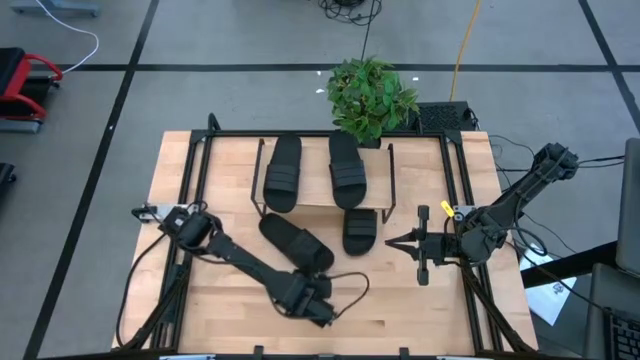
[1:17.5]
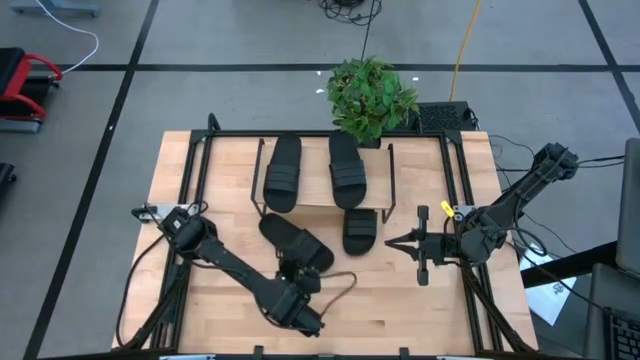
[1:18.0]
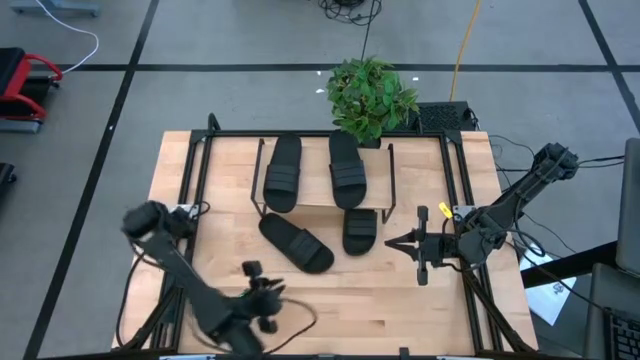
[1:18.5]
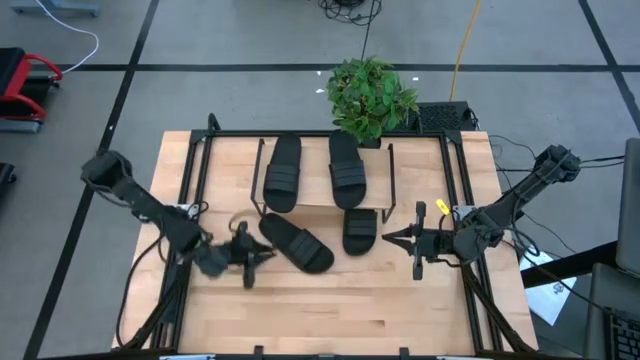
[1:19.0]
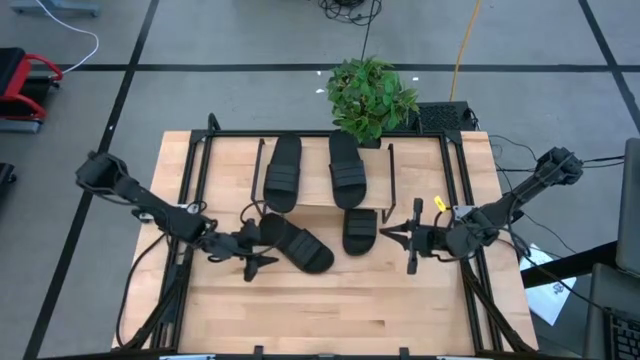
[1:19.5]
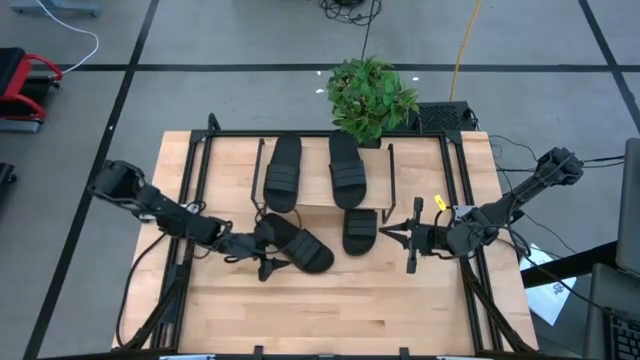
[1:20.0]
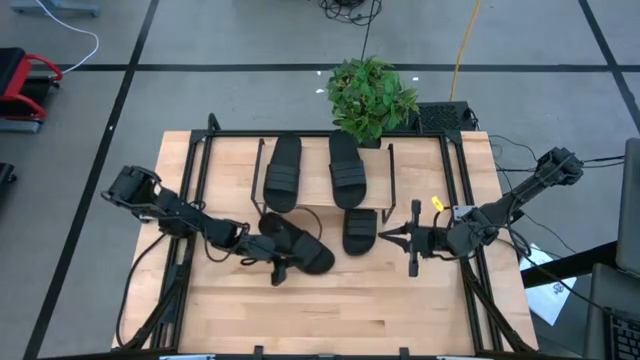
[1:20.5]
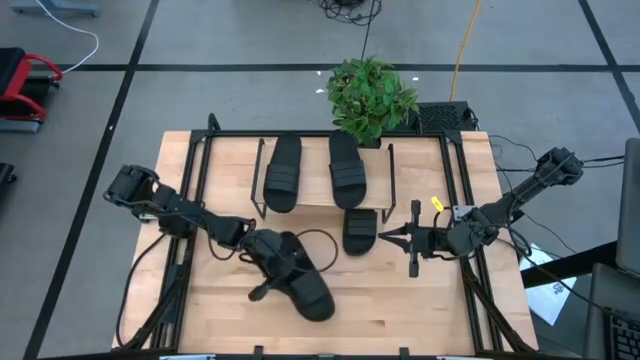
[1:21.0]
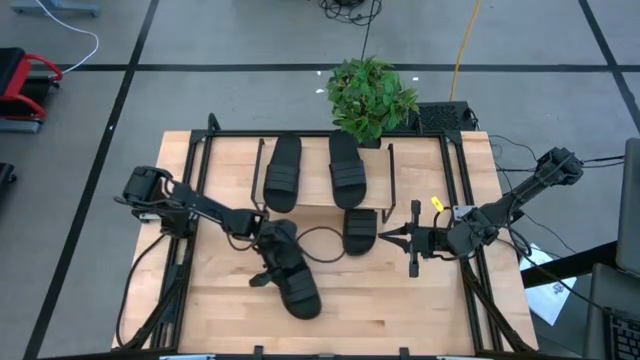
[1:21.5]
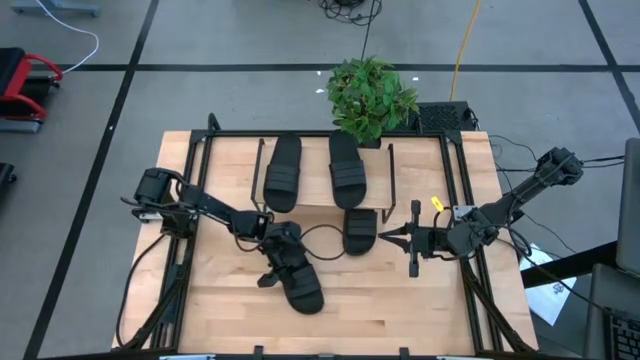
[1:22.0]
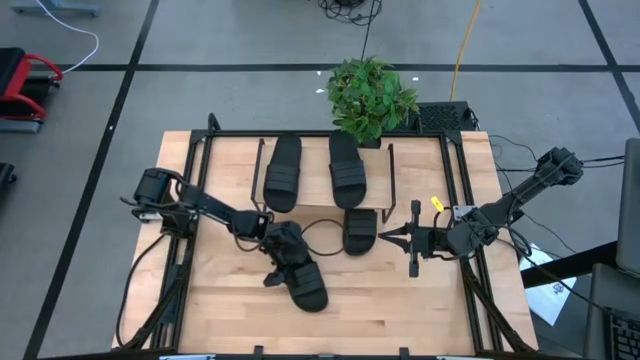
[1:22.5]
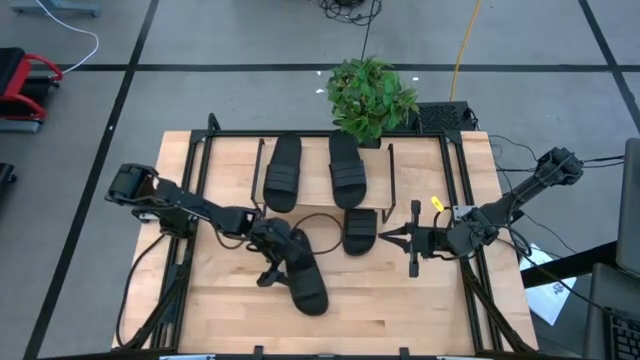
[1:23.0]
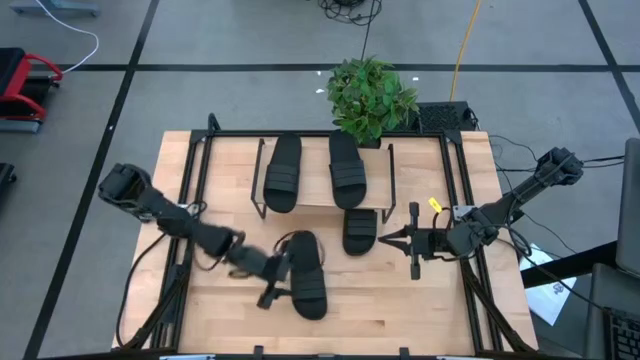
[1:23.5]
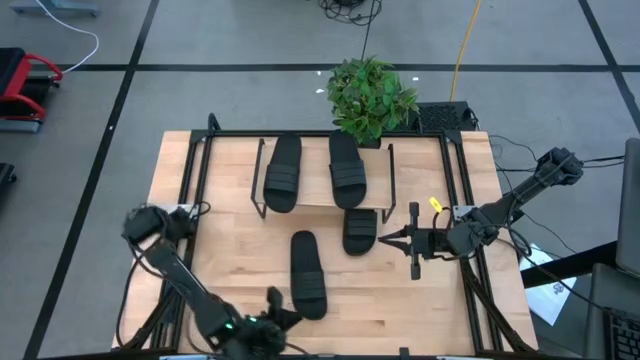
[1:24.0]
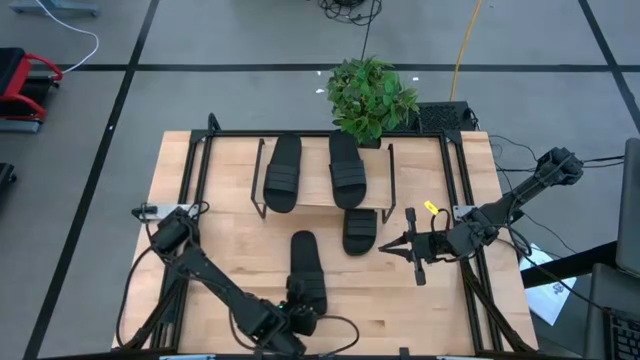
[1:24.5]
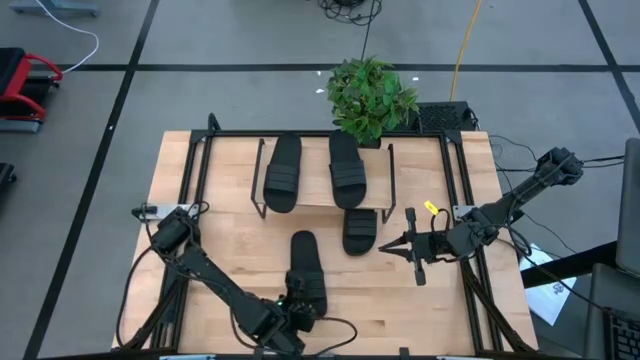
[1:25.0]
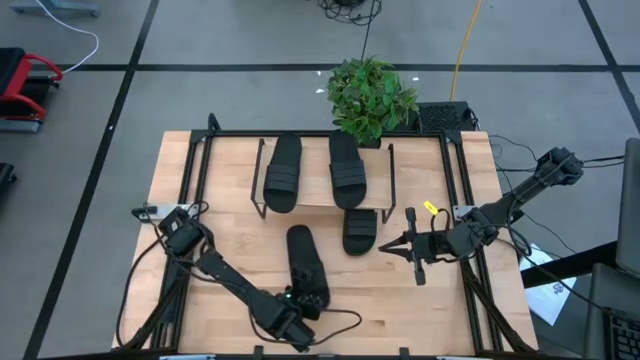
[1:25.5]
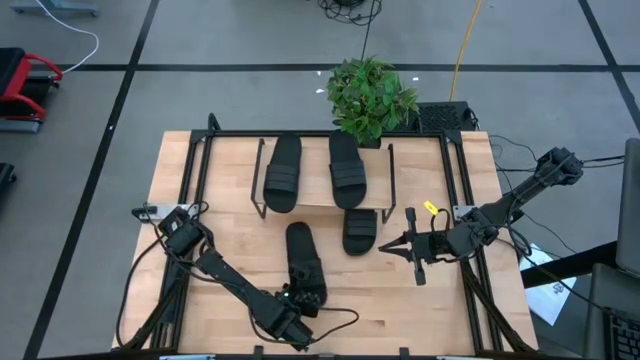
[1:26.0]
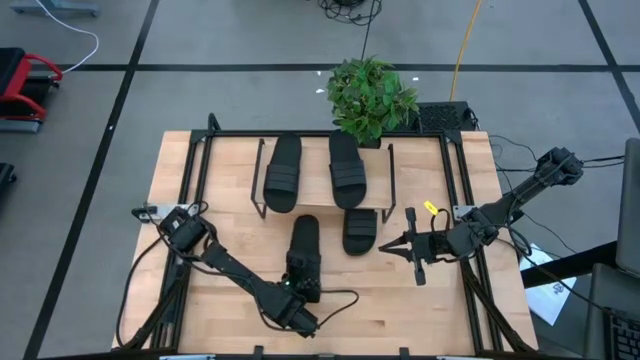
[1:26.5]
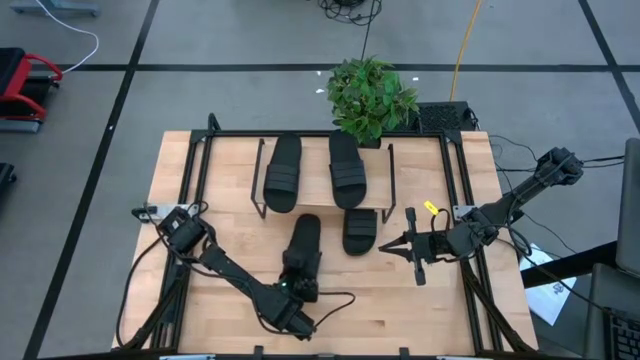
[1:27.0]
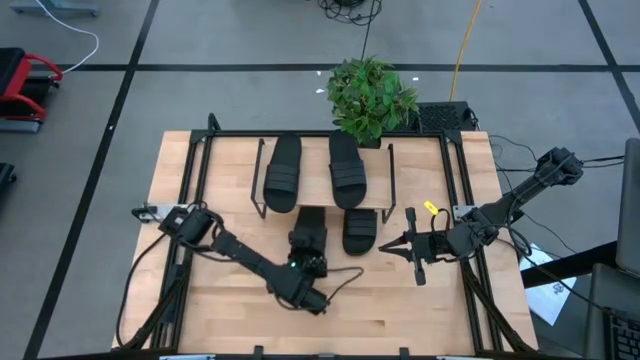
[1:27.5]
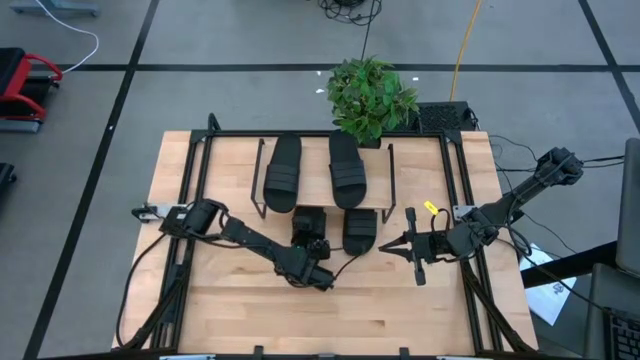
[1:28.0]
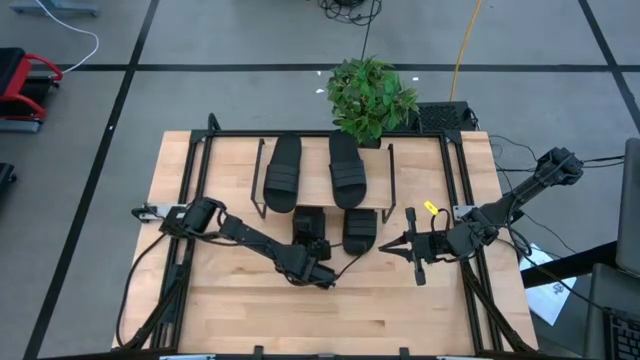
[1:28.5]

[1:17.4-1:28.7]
Task: Pick and place slides into the shelf
Put the black slide under the shelf

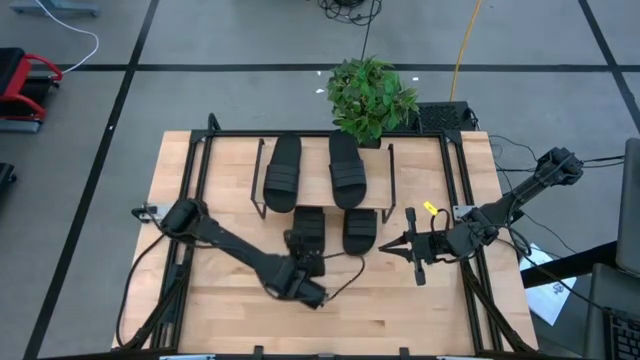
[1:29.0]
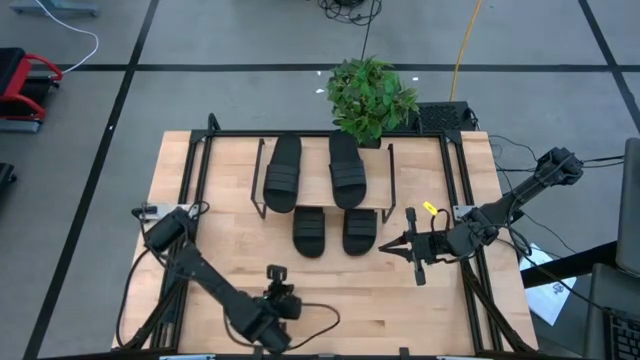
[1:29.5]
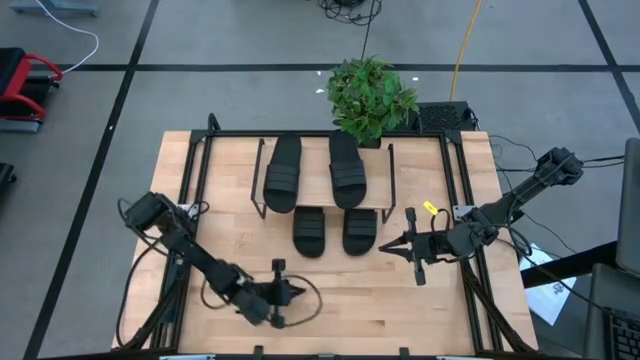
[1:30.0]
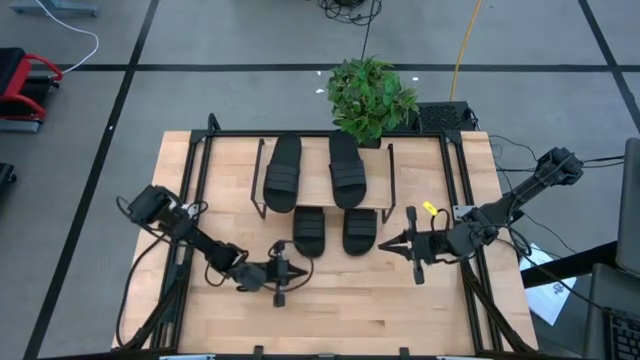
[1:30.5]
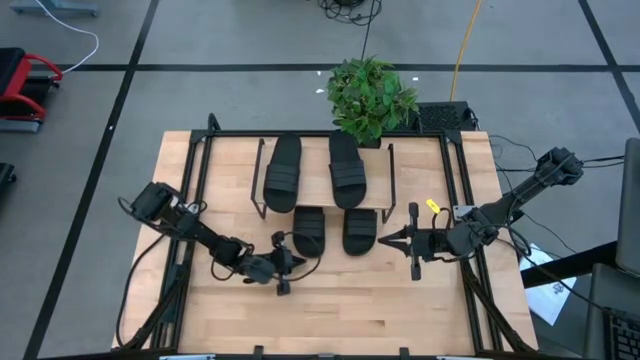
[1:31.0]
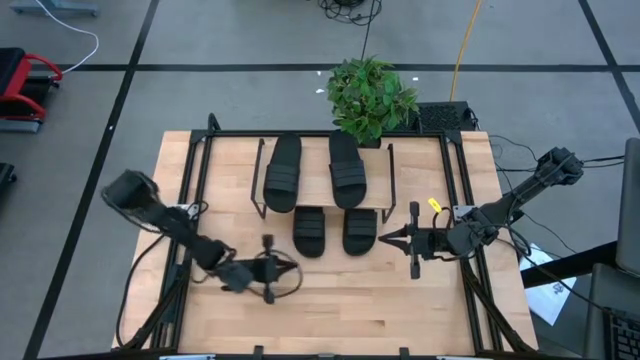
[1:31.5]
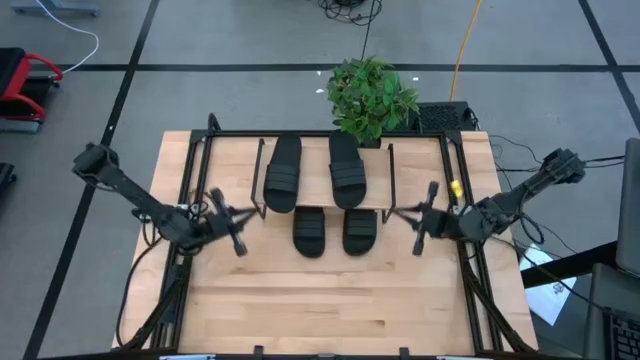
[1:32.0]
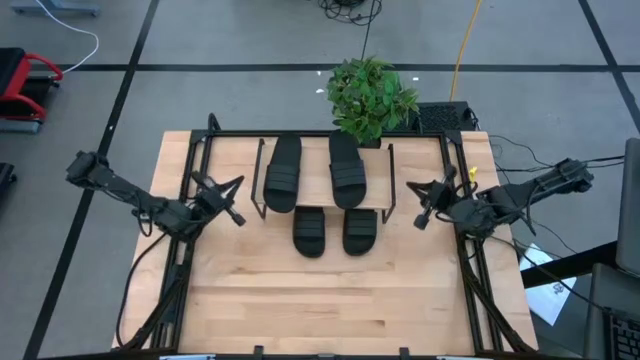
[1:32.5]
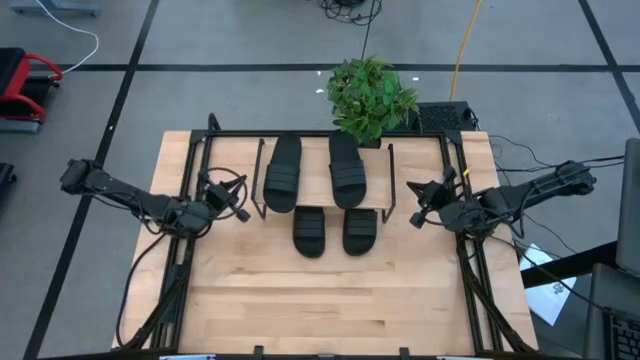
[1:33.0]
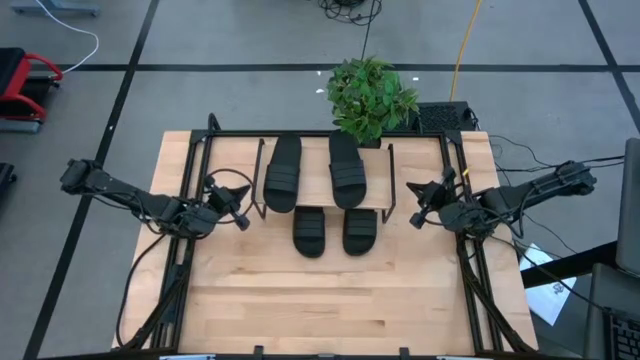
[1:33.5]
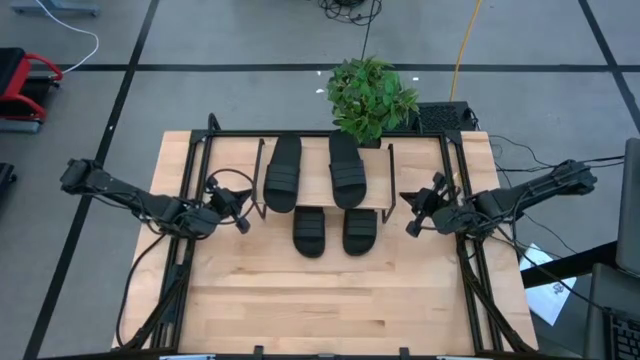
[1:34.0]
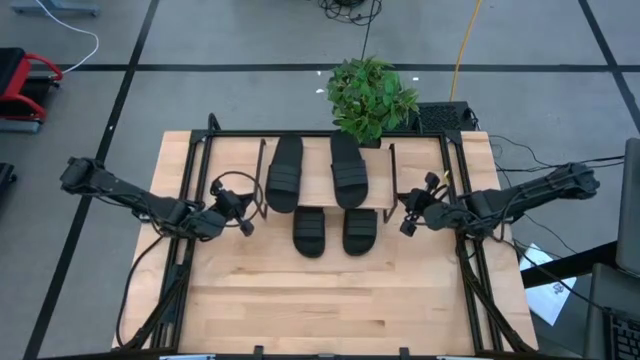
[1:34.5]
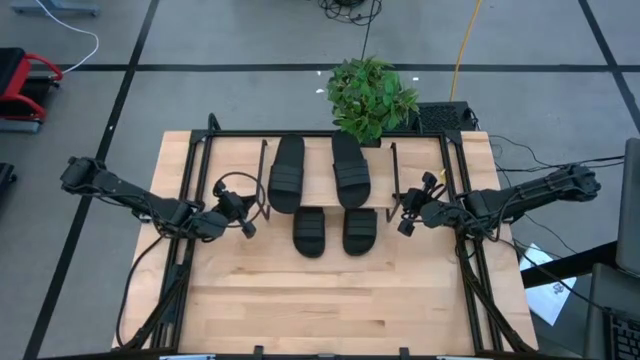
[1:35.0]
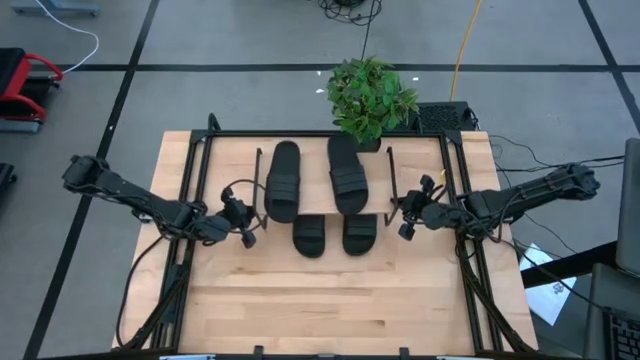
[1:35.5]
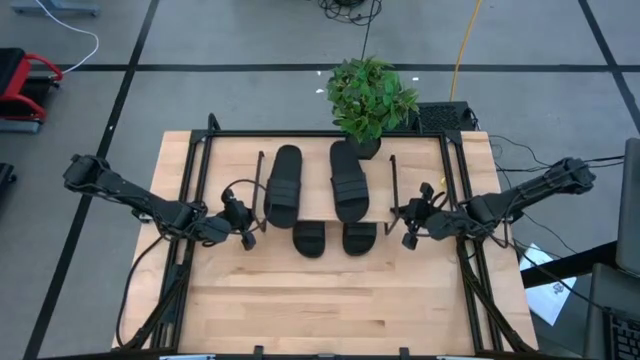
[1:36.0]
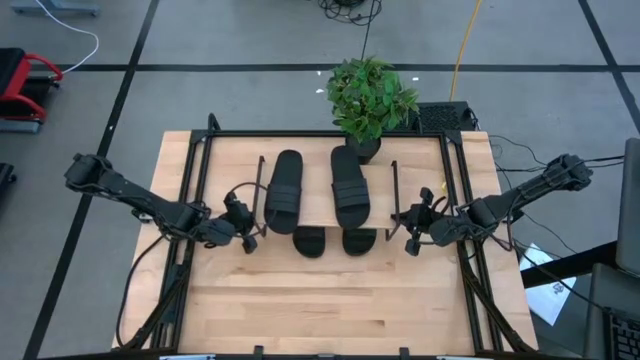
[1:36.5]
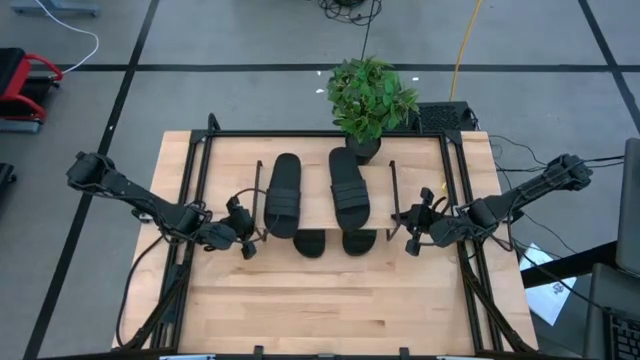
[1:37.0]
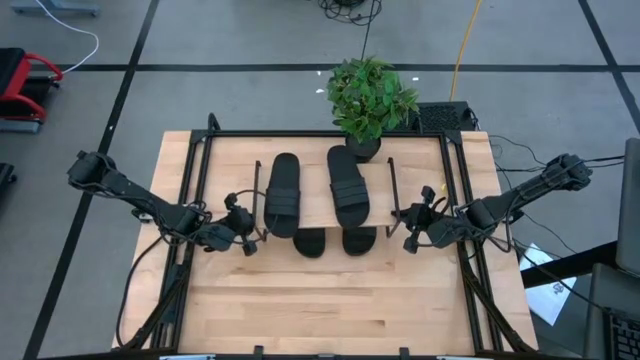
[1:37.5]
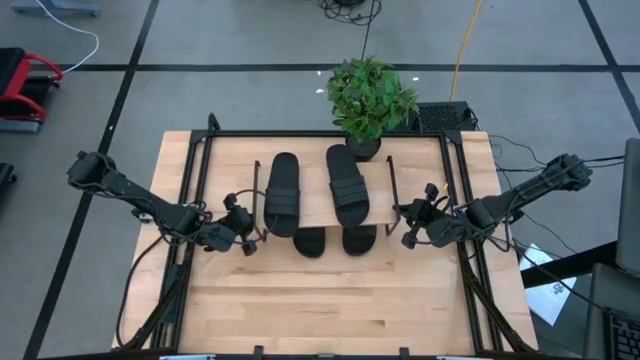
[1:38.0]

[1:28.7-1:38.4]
Adjust the shelf

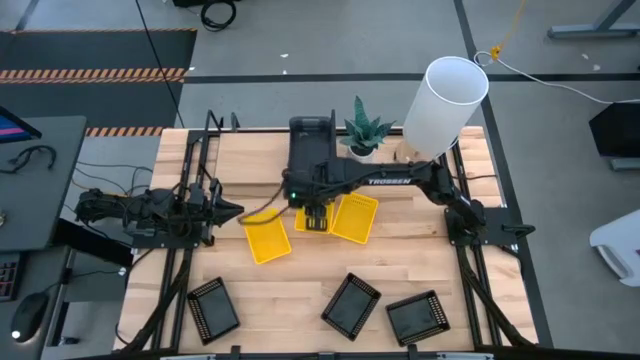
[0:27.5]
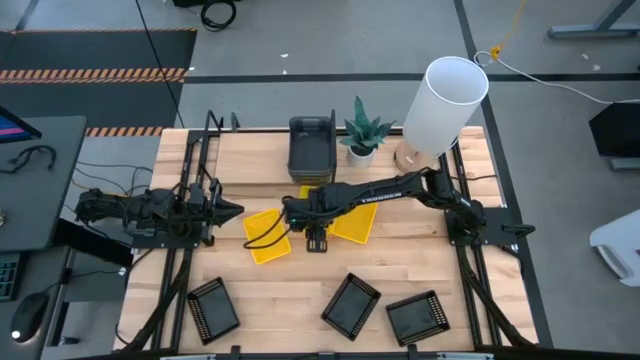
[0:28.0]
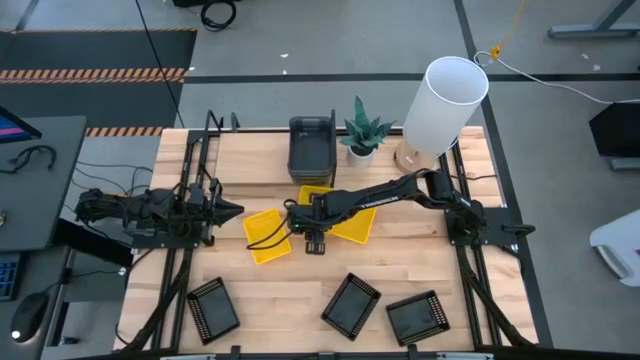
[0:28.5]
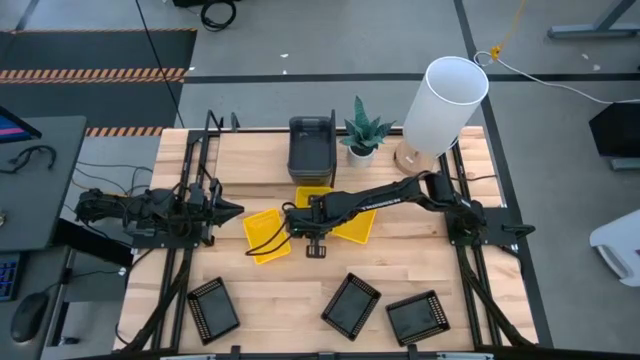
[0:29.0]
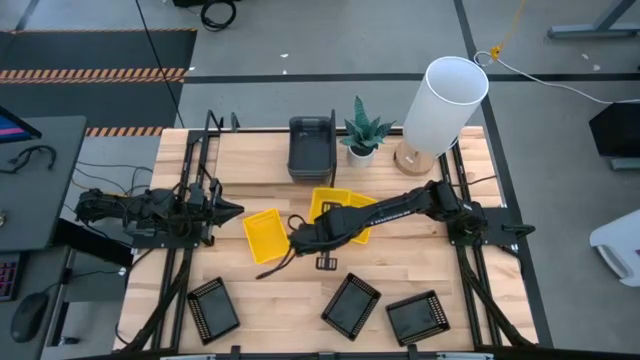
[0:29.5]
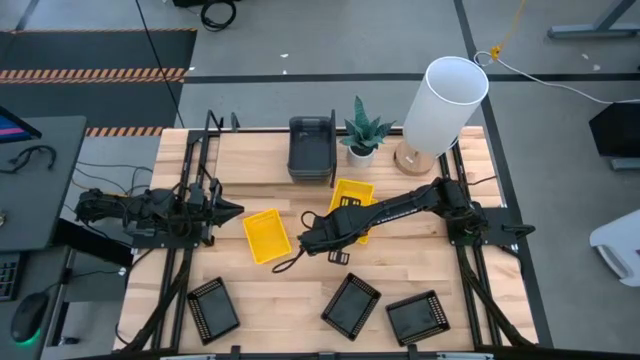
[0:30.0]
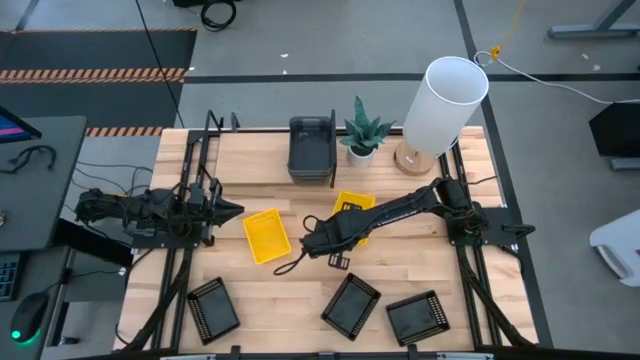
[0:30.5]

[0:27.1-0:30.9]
Task: Stack baskets on shelf by color
Stack the middle yellow bin into the right yellow bin
